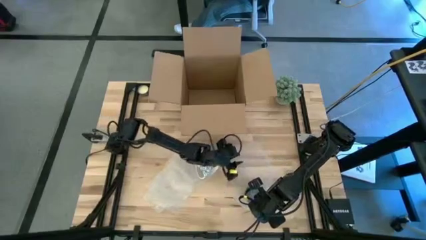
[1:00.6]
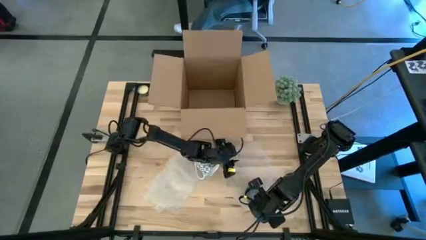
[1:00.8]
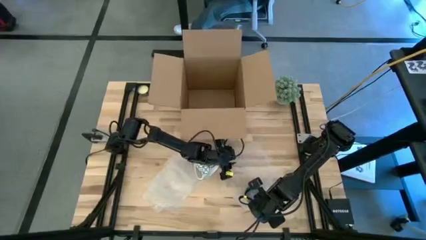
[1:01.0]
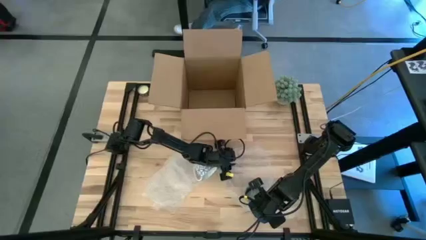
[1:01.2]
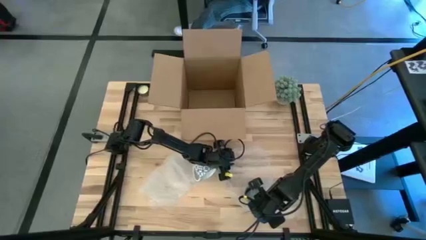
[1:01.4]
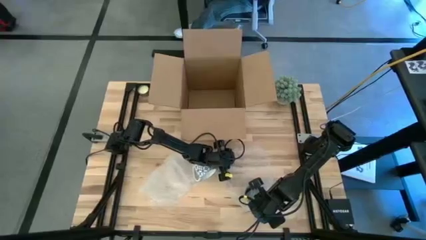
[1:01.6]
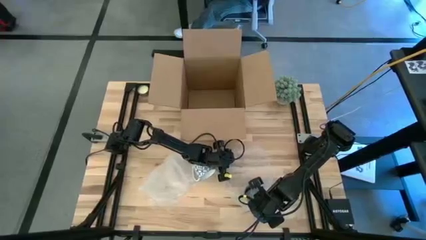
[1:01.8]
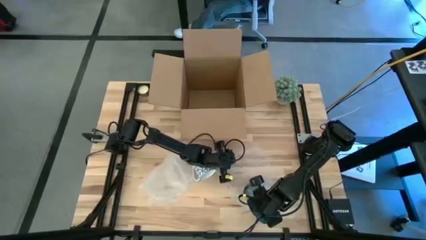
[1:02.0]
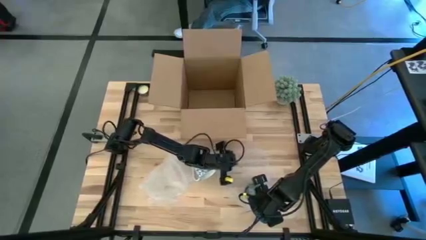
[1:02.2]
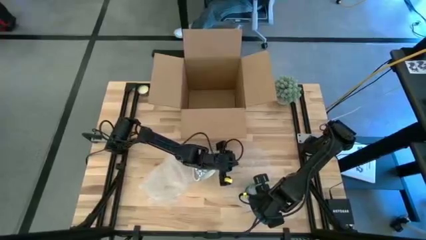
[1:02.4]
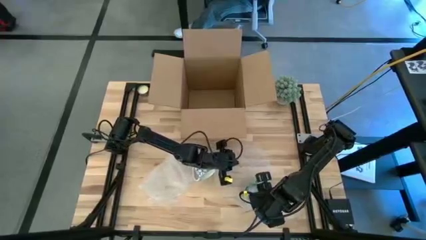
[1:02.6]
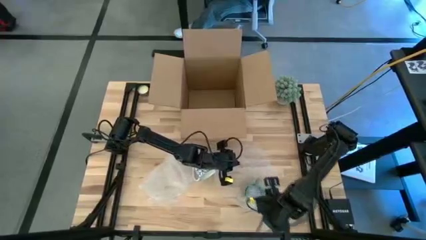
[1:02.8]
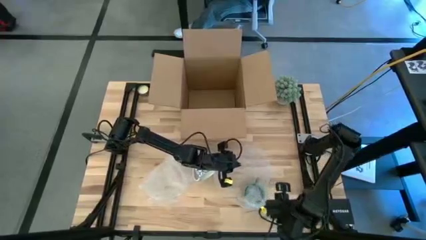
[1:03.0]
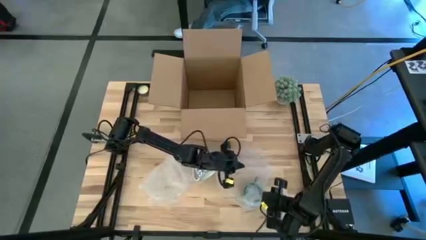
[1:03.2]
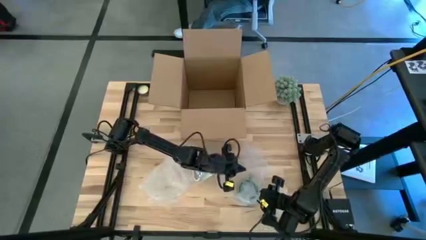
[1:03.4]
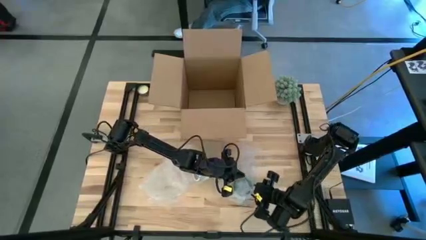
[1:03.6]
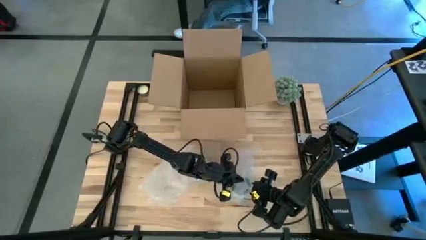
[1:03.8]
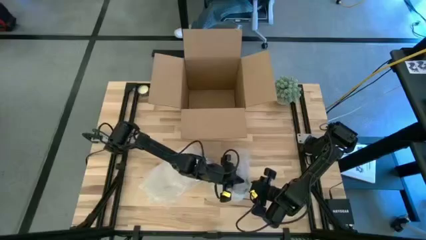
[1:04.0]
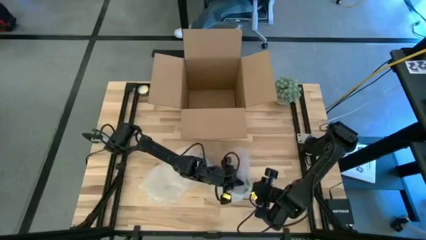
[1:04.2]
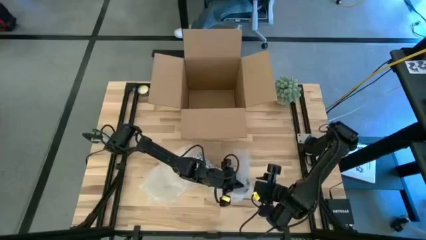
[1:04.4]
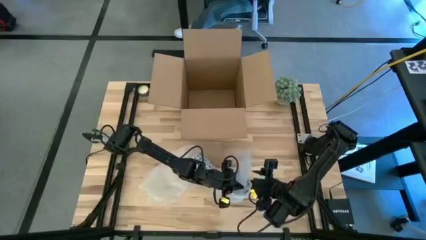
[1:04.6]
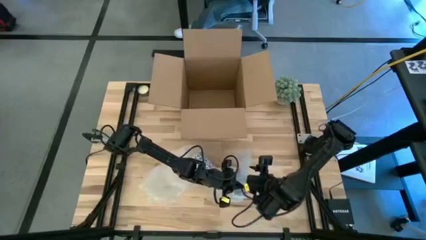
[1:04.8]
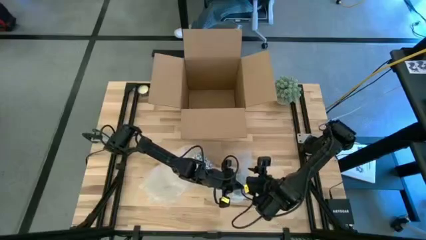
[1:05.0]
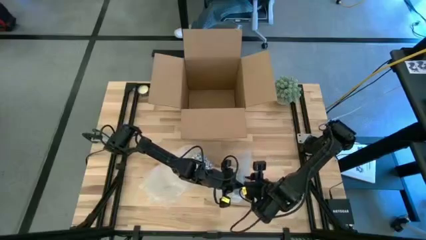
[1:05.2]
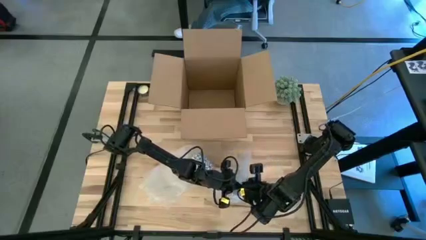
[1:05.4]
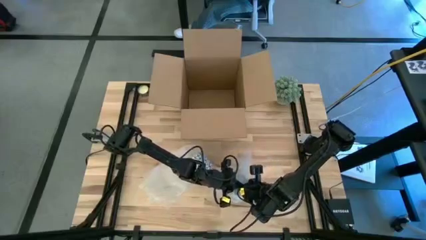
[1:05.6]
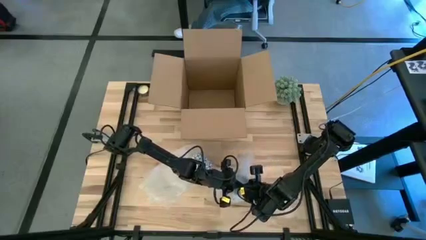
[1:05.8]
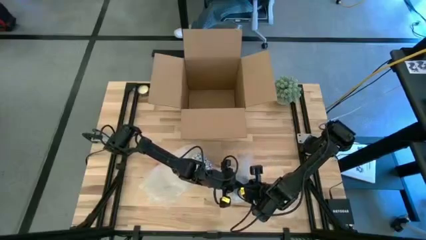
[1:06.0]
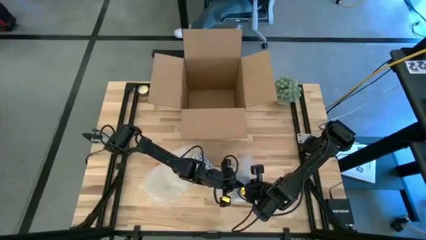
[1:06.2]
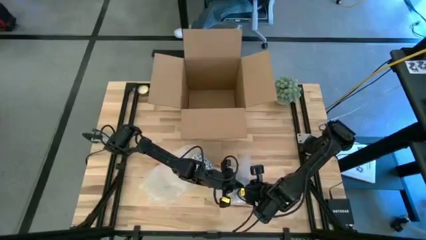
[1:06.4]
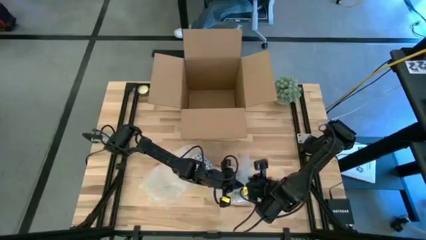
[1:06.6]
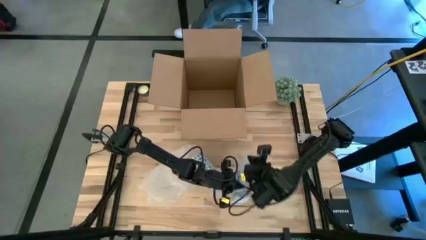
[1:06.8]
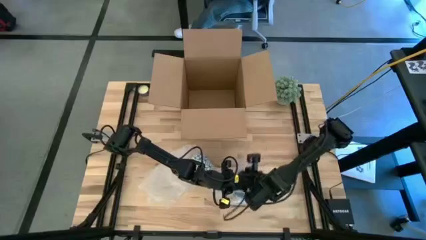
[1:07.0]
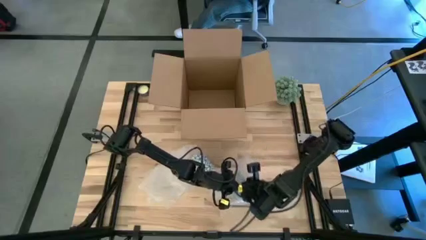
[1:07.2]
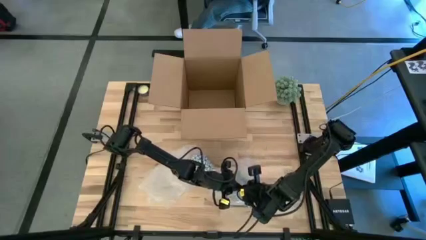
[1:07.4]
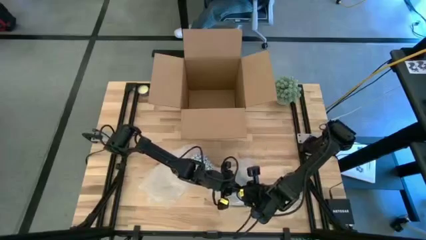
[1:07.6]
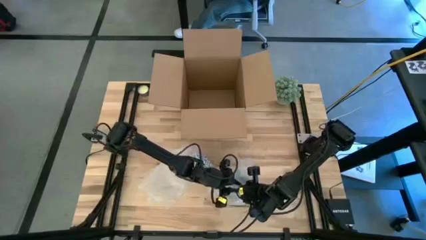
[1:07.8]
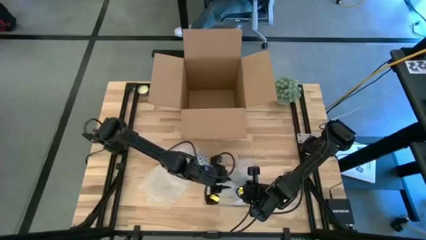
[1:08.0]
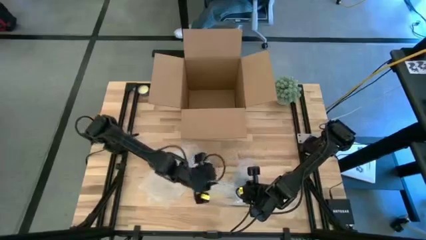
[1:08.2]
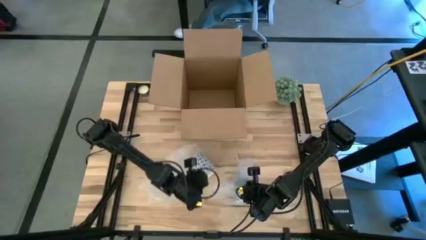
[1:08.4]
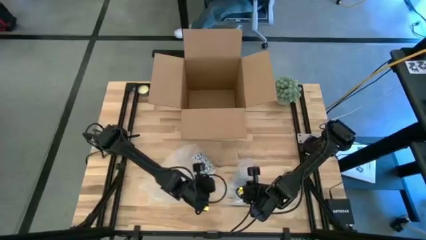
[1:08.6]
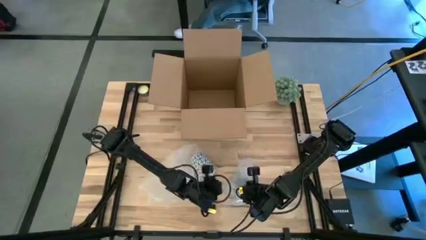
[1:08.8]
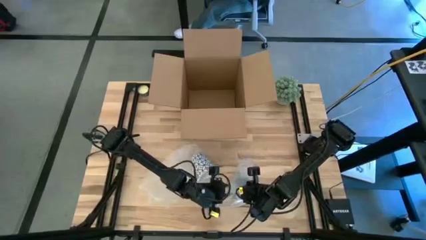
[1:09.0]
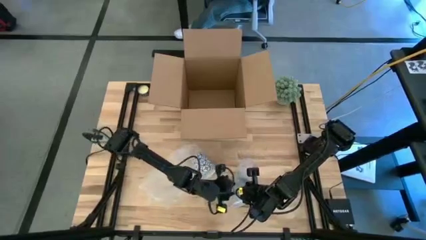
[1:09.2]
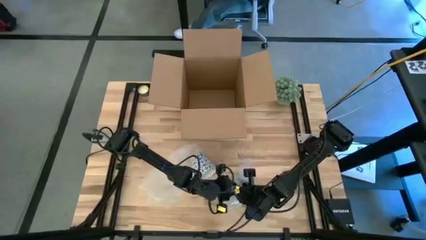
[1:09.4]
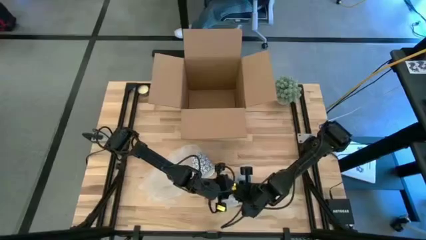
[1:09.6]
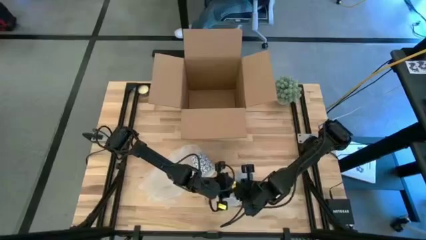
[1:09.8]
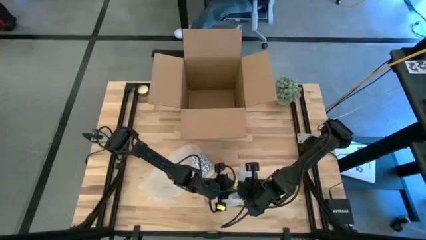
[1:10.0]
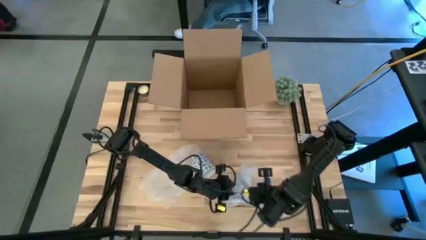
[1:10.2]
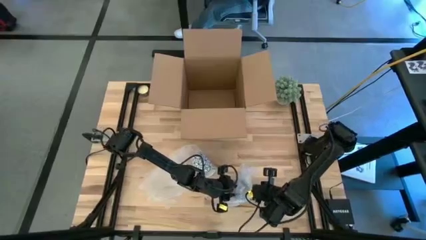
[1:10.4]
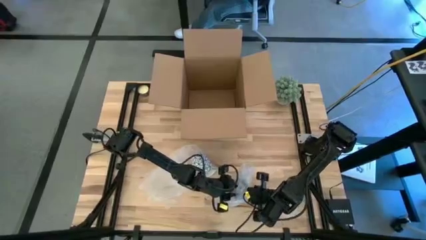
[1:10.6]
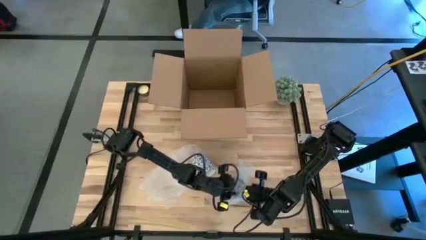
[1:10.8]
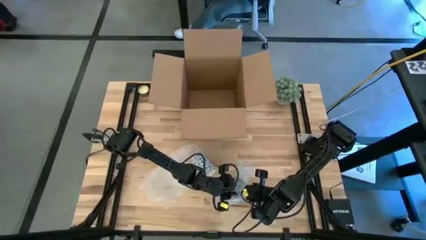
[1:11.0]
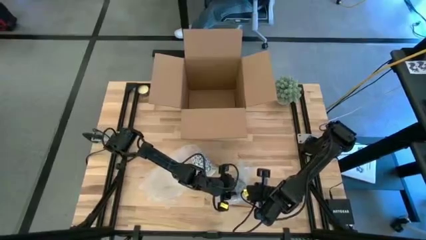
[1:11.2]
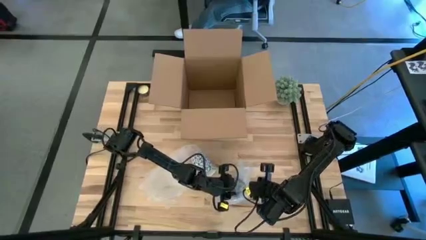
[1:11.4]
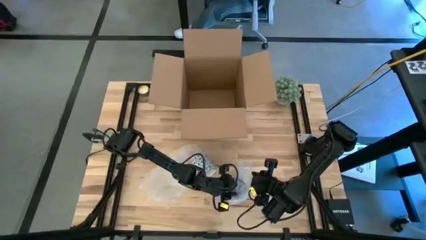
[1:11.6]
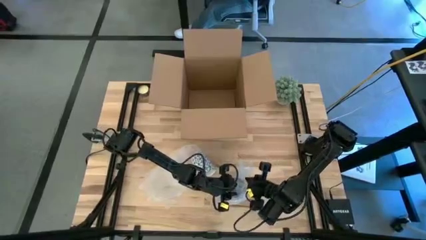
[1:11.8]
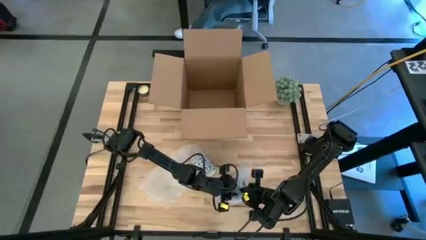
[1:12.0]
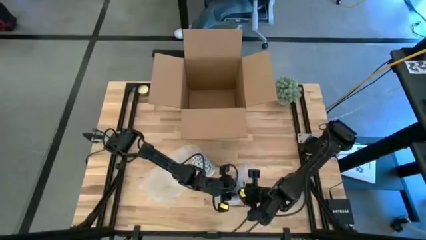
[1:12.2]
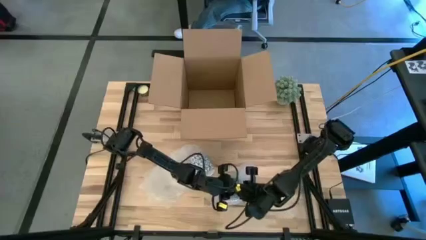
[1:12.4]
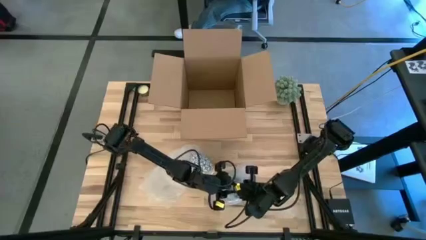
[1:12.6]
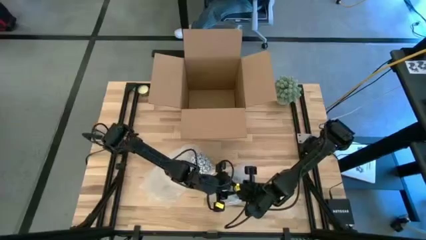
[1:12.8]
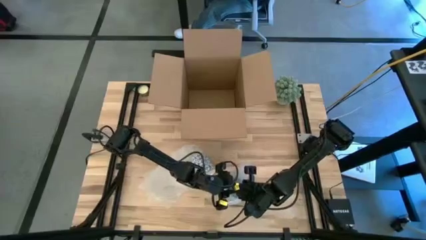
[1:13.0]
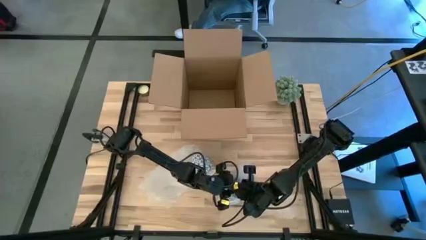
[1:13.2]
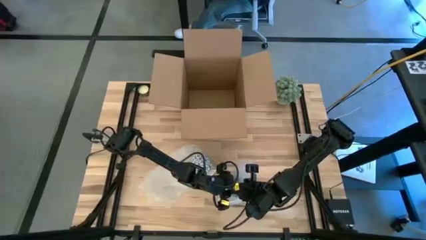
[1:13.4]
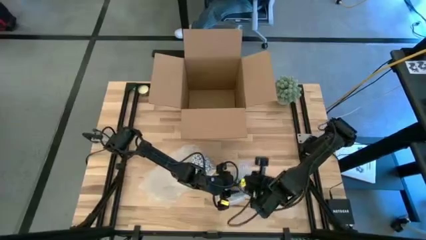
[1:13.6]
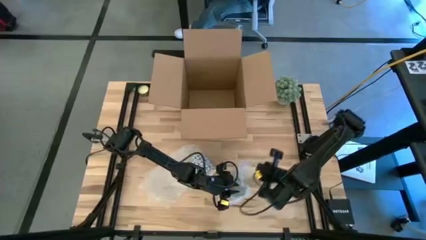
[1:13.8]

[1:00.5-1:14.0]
Task: wrap mug
Wrap the green mug with the right transparent bubble wrap

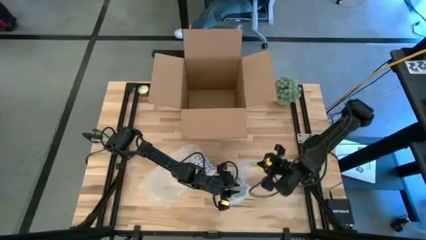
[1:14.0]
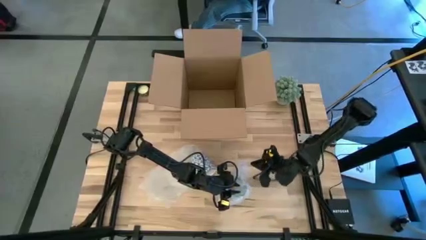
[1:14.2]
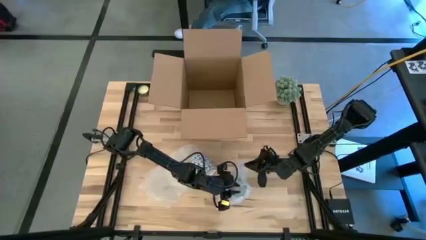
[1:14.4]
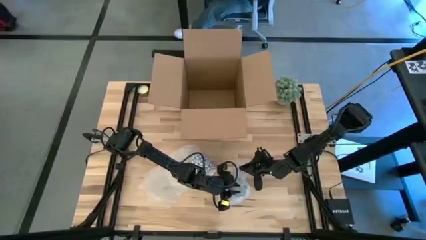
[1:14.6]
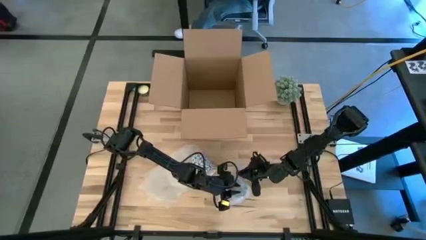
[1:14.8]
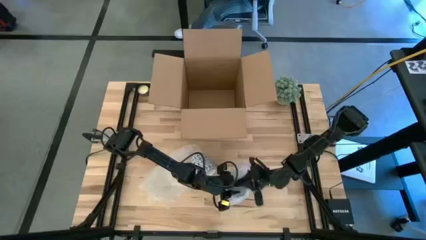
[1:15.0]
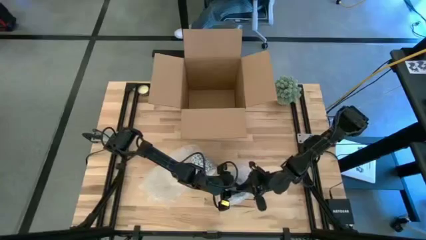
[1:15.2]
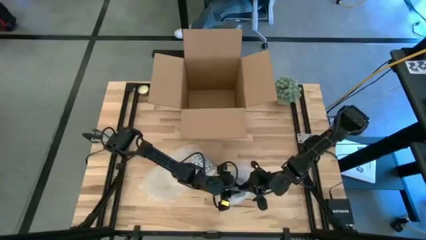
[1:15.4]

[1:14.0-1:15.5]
Wrap the green mug with the right transparent bubble wrap

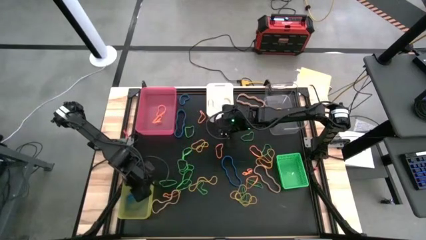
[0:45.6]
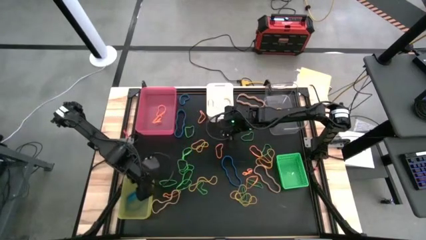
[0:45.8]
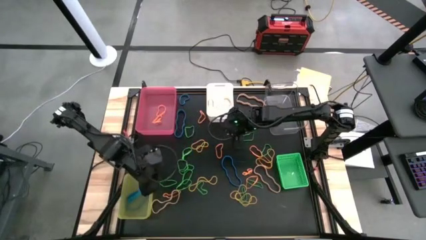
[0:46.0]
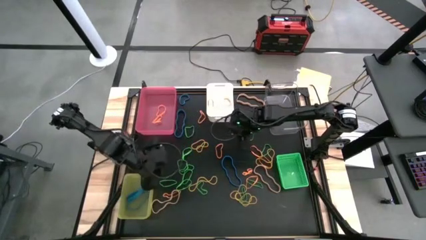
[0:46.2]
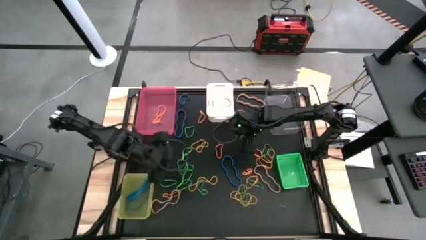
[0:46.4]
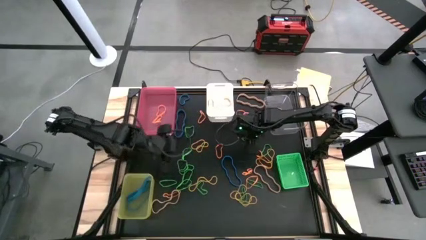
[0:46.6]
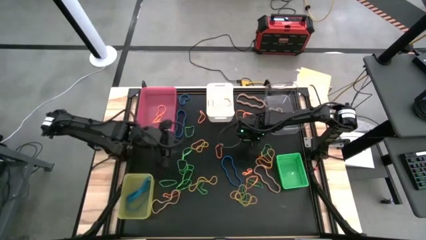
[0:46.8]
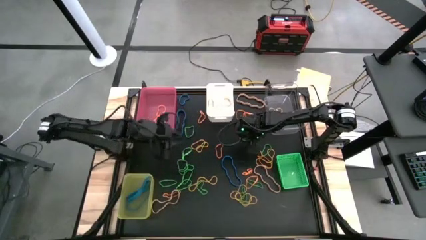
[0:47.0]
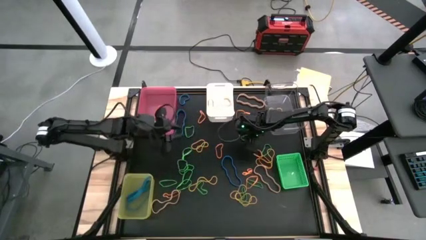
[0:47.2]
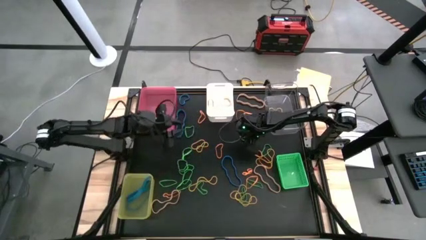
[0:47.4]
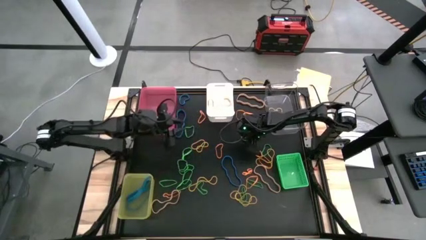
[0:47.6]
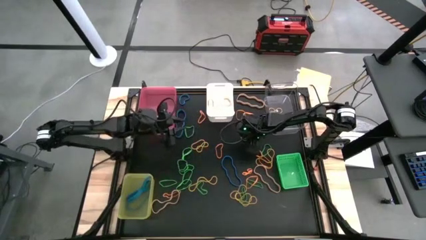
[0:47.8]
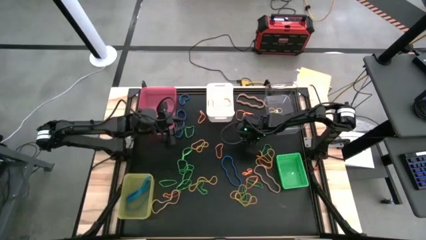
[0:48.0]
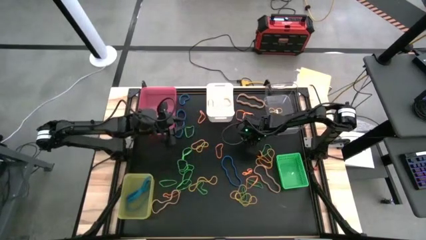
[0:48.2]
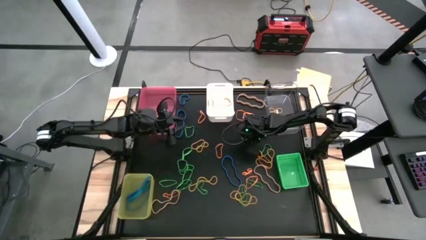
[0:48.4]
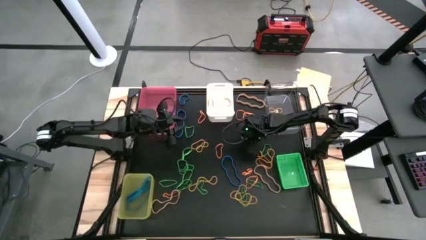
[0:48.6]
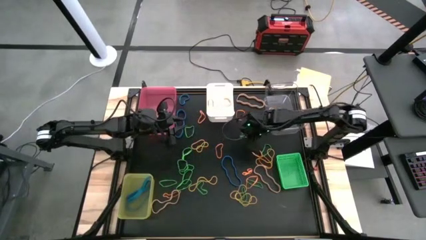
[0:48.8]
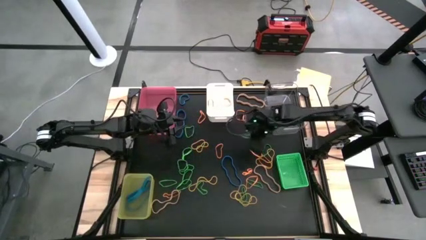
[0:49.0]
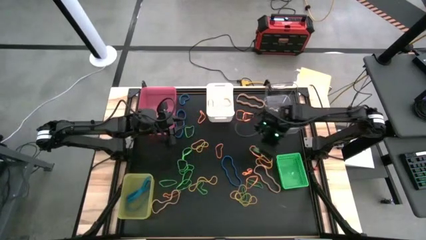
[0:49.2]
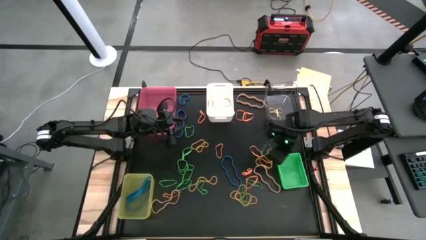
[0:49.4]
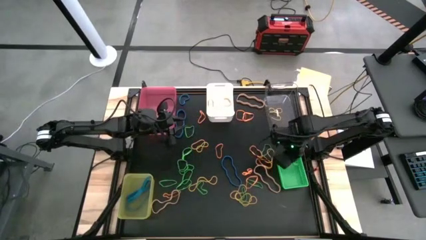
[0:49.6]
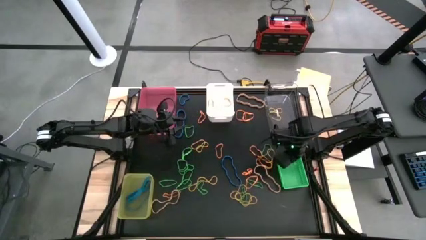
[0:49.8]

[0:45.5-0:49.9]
Task: Sort rubber bands into baskets
Put the green rubber band into the green bin
